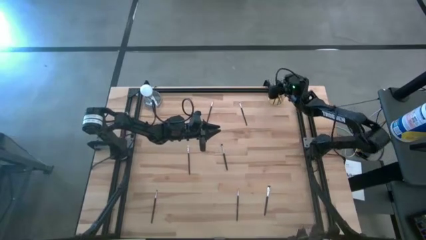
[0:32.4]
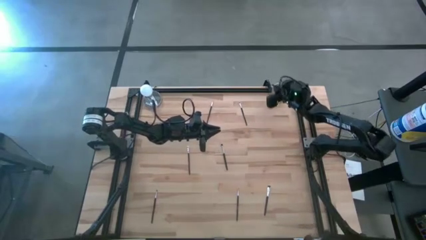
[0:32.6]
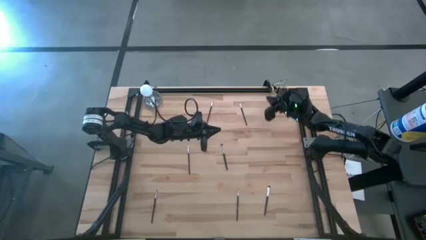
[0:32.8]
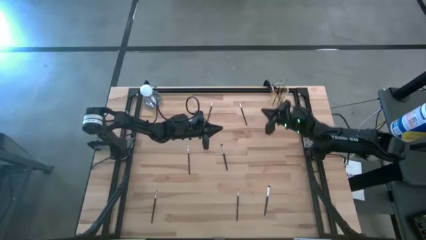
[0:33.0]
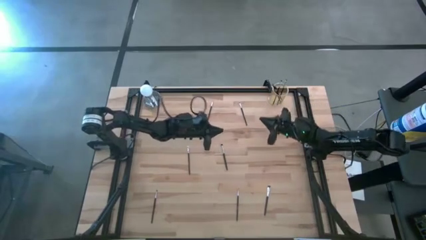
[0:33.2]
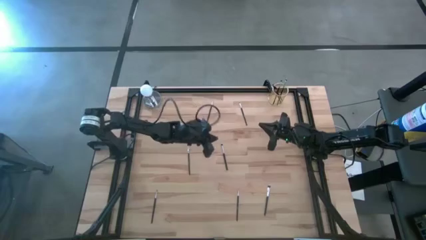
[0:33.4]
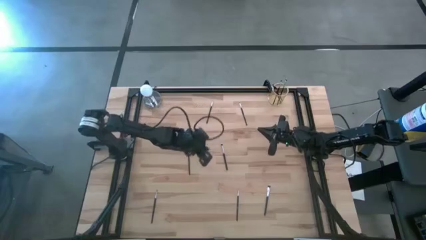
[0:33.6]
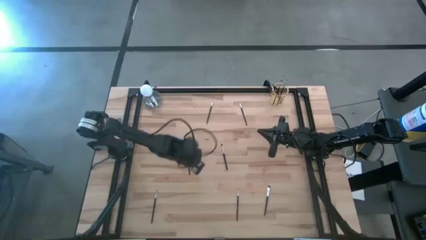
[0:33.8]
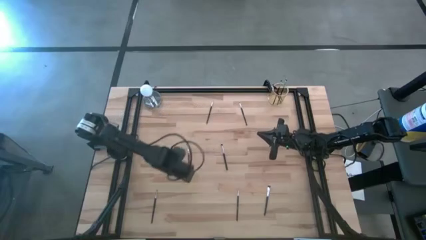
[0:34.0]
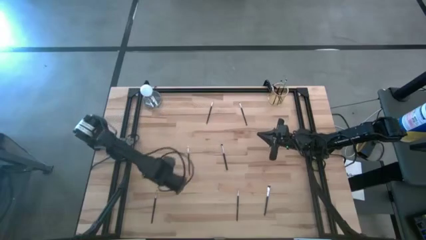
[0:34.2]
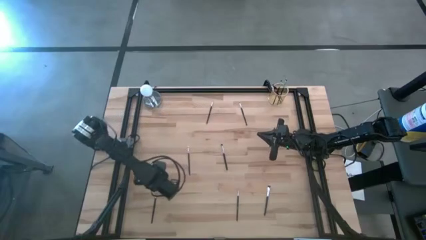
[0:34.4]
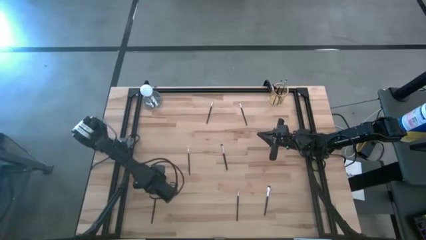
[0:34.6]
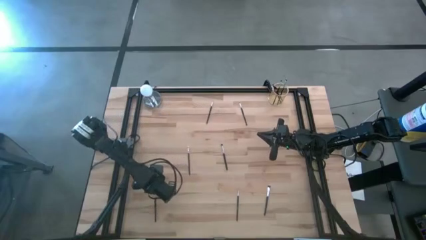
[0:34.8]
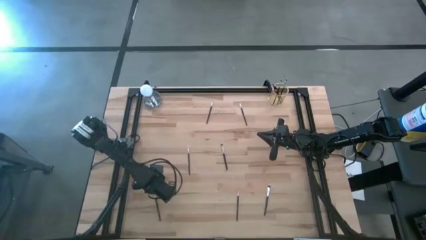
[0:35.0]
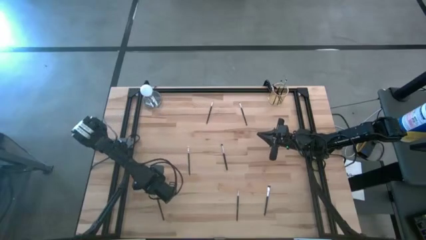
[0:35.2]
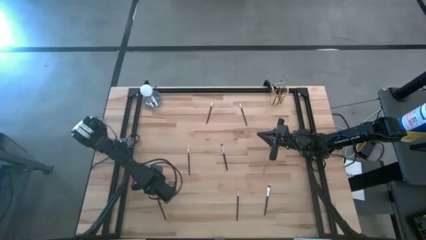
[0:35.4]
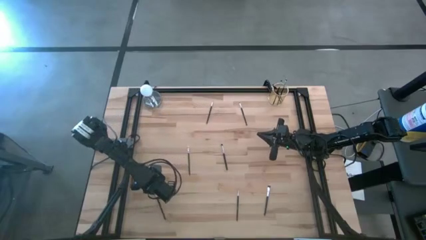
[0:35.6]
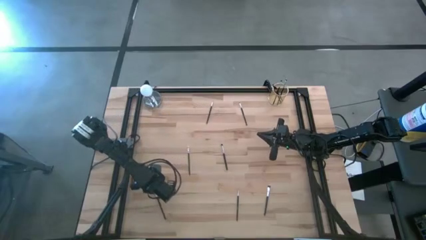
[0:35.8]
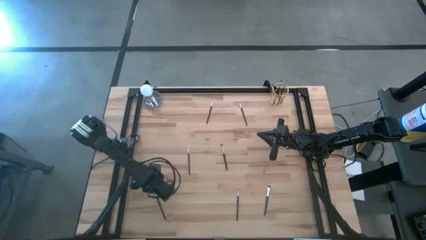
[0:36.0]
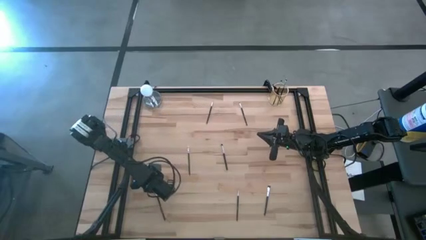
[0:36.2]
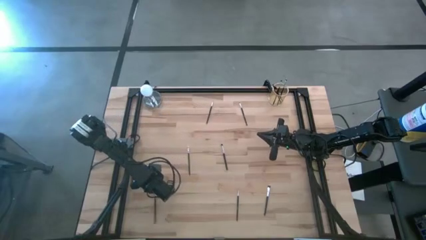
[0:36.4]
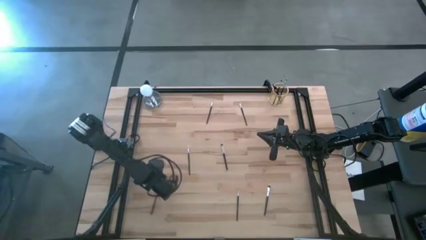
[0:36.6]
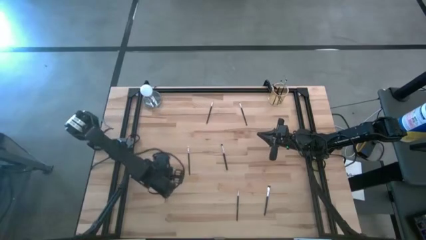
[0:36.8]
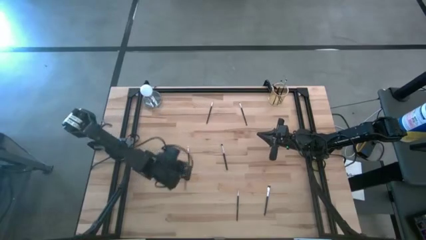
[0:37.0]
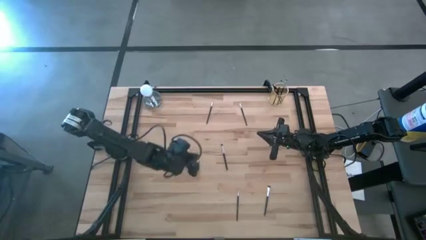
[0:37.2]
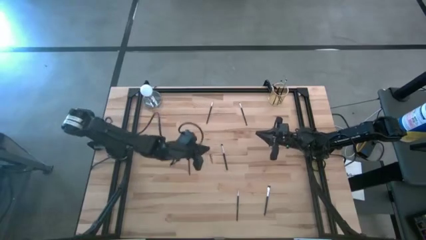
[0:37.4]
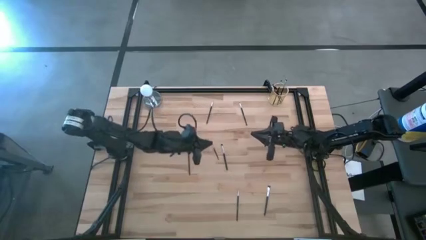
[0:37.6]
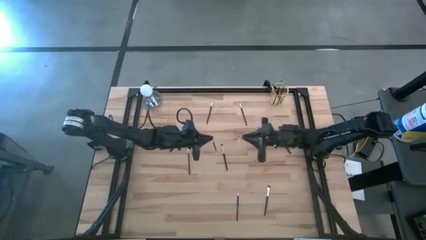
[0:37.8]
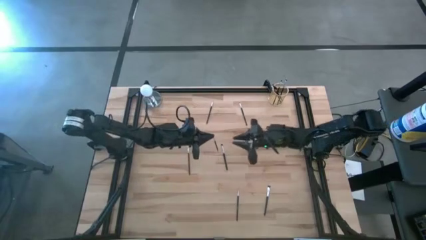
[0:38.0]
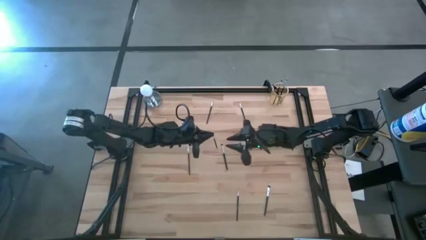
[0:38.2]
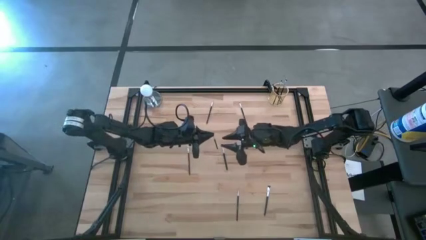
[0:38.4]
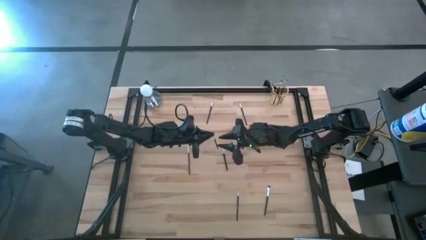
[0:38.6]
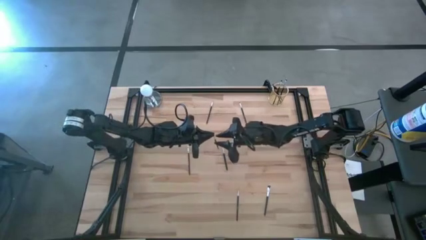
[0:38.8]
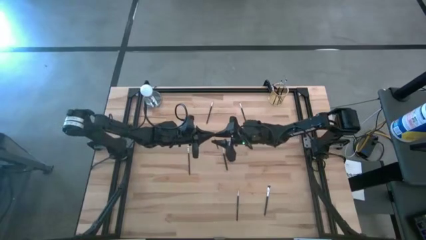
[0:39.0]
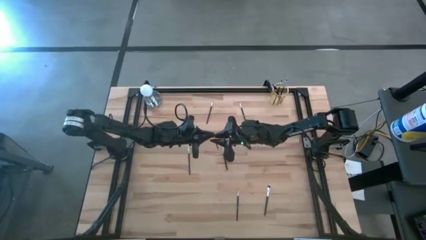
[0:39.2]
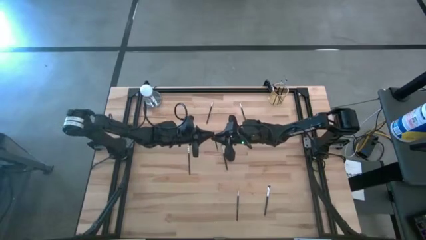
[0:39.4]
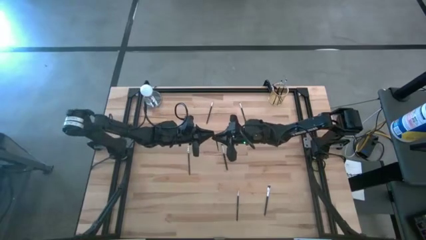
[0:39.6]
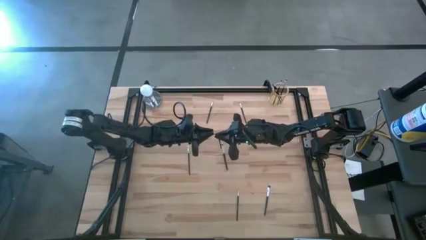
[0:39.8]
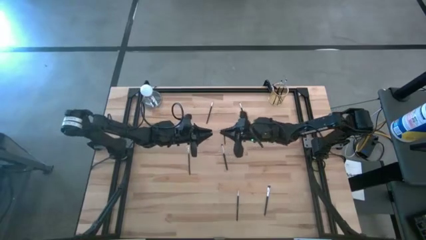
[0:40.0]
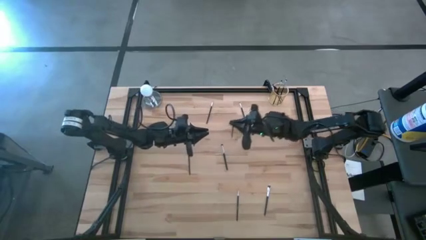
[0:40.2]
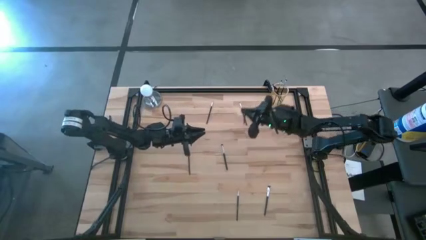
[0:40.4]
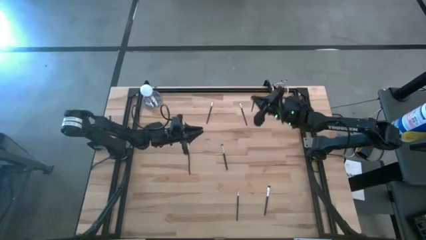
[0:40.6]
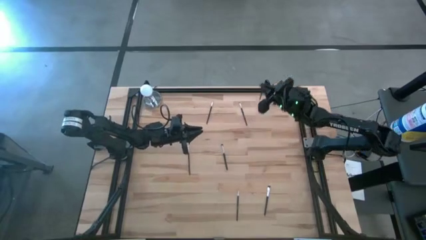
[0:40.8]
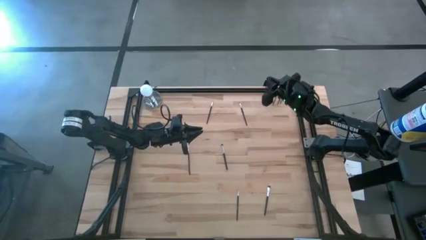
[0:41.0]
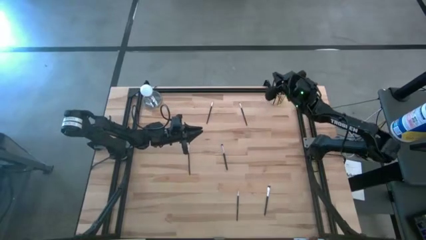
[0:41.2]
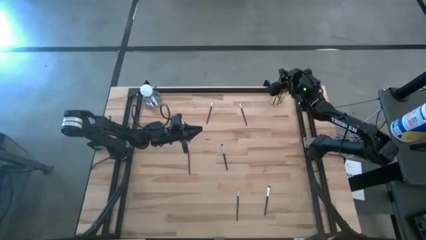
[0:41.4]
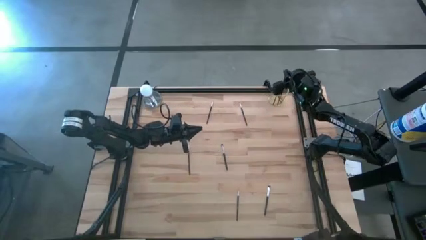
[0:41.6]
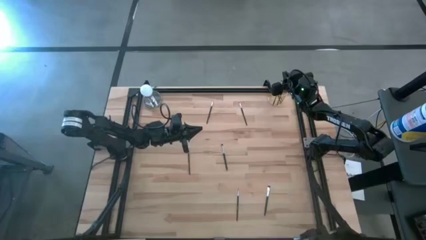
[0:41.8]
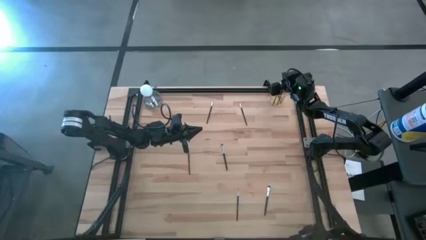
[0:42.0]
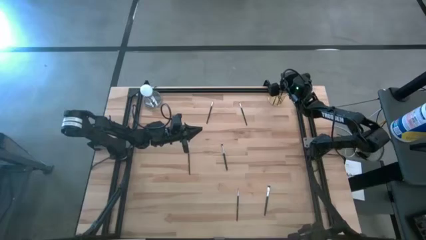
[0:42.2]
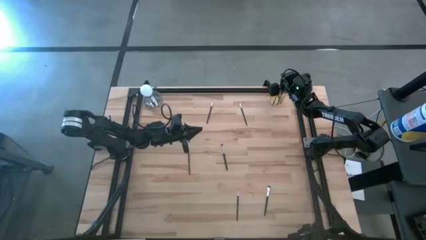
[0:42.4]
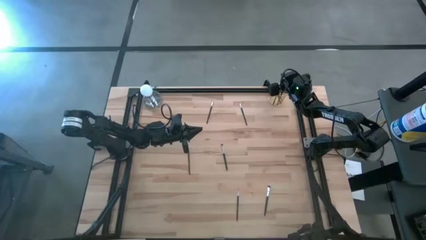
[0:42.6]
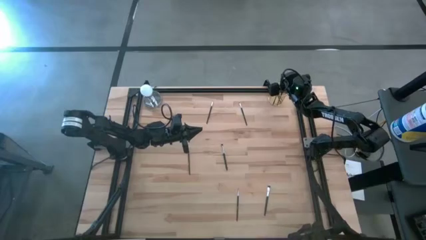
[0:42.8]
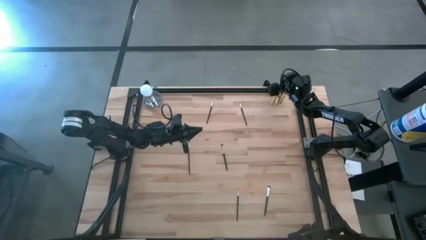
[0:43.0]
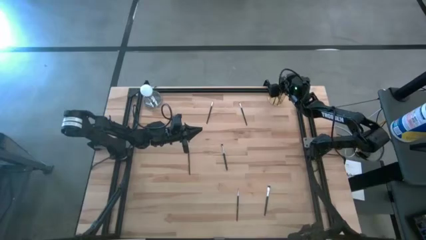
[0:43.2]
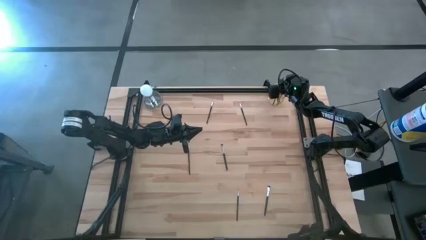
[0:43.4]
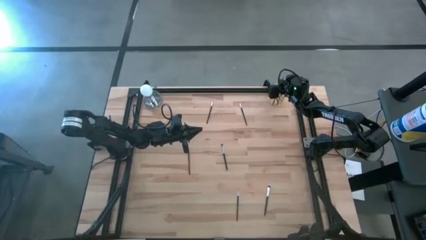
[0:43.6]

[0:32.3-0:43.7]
Task: Sort items
Put the black eyeshadow brush into the gold holder

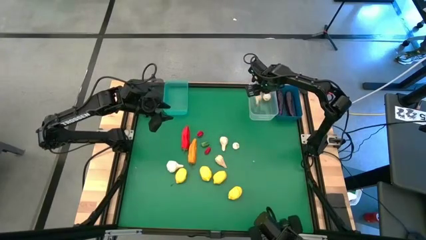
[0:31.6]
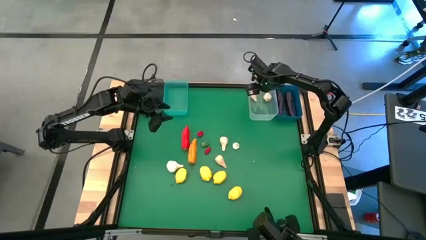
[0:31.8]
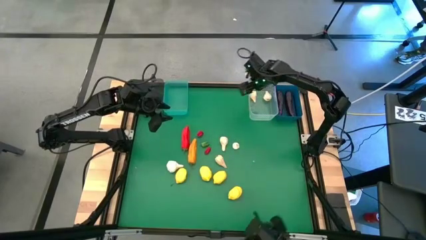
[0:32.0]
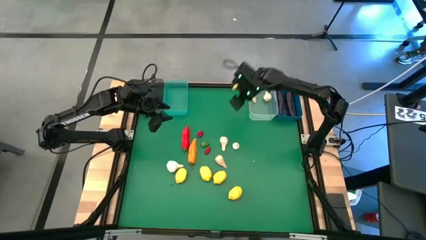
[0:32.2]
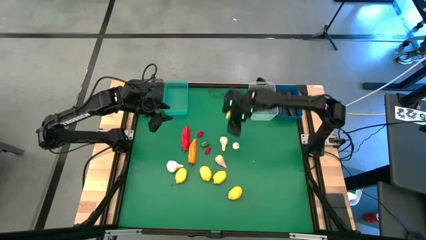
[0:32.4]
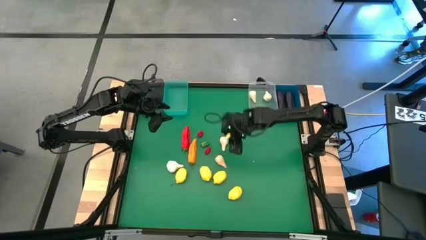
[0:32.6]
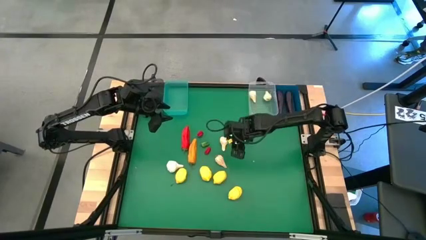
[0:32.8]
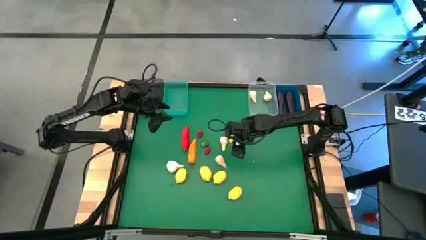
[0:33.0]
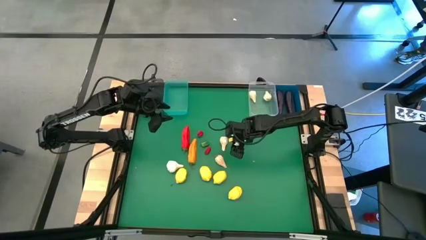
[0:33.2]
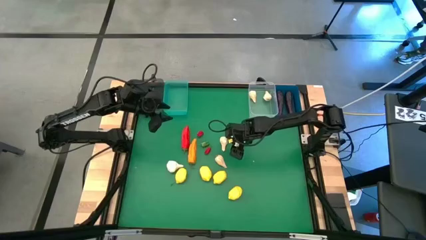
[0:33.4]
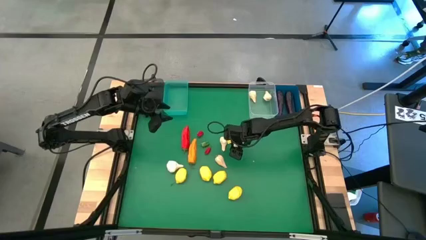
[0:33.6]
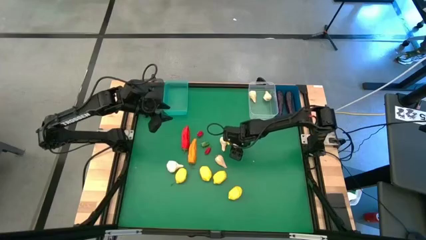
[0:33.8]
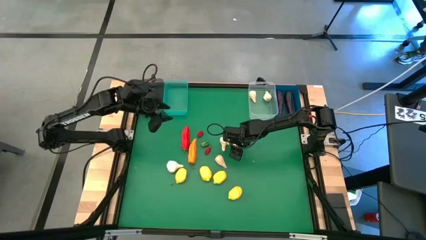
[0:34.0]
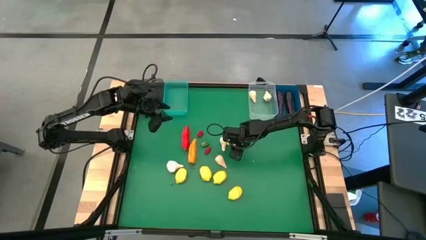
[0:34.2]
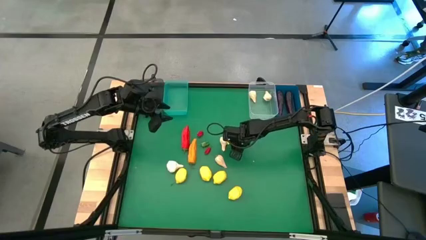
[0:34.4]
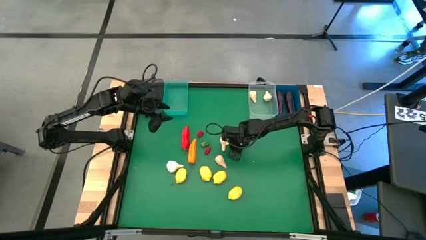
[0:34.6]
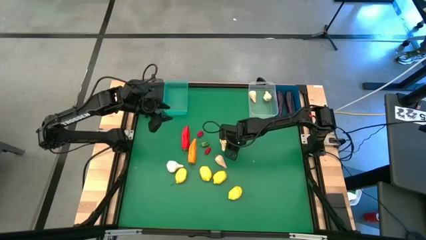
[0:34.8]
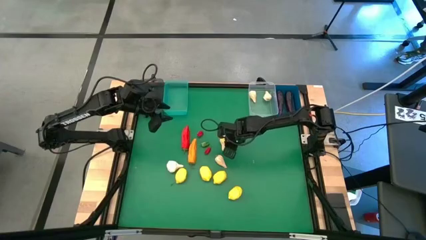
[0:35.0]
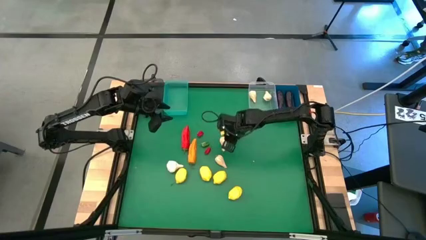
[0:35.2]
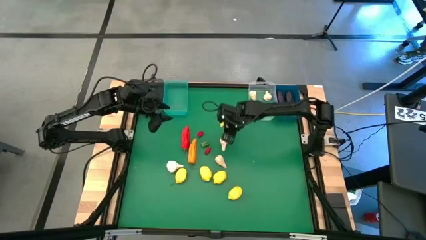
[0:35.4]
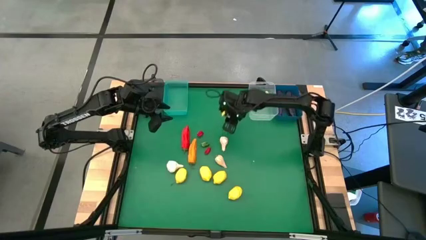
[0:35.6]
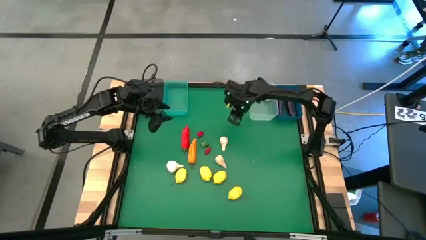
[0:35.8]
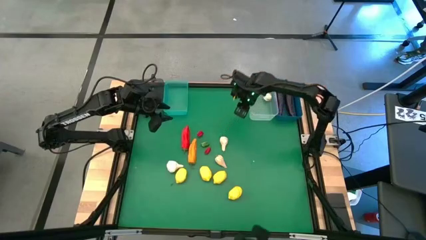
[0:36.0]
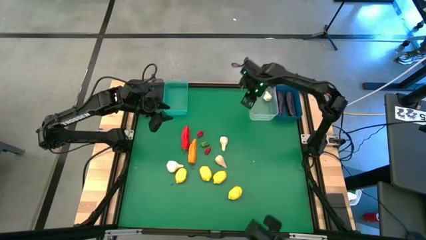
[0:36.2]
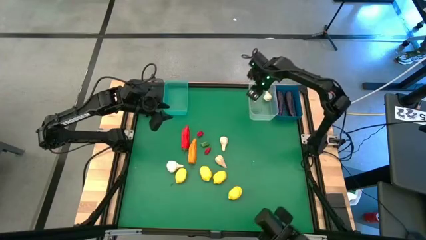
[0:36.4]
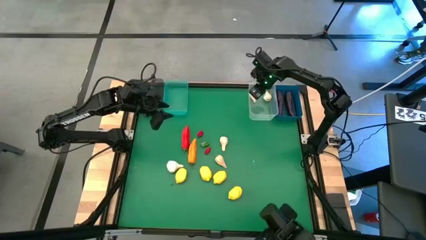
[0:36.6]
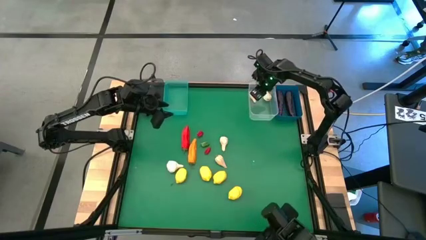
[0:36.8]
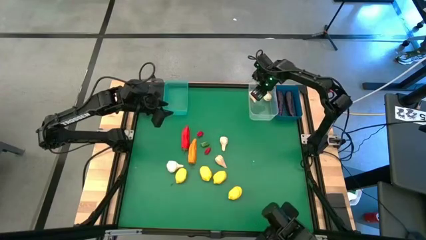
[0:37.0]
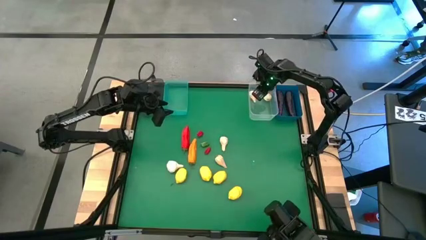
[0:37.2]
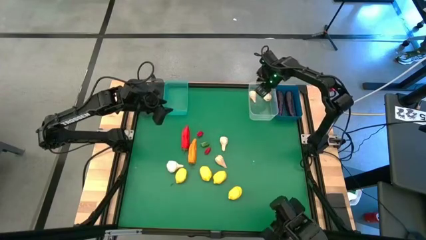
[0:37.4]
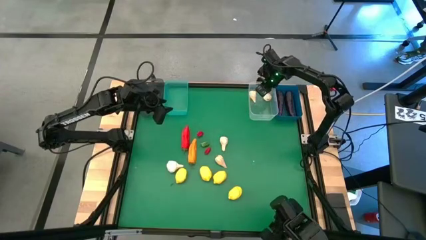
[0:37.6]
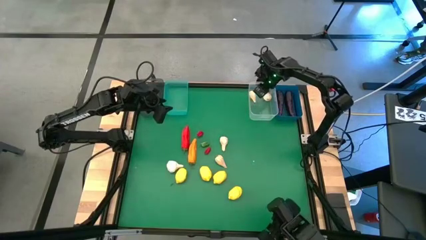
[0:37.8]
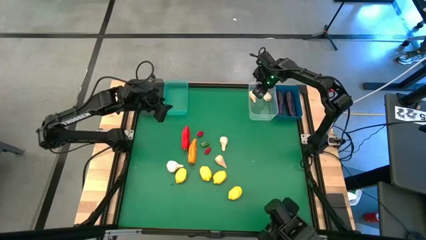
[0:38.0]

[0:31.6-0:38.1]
Task: Sort produce into baskets
Put the garlic into the transparent bin
